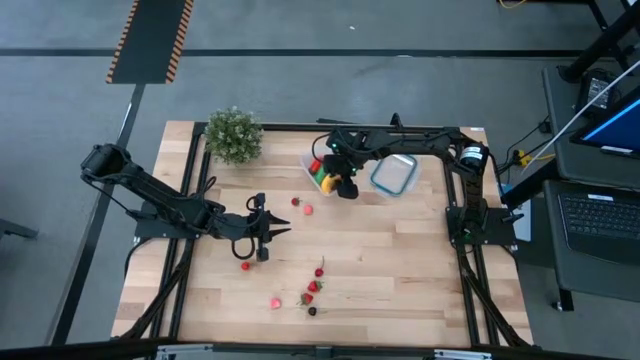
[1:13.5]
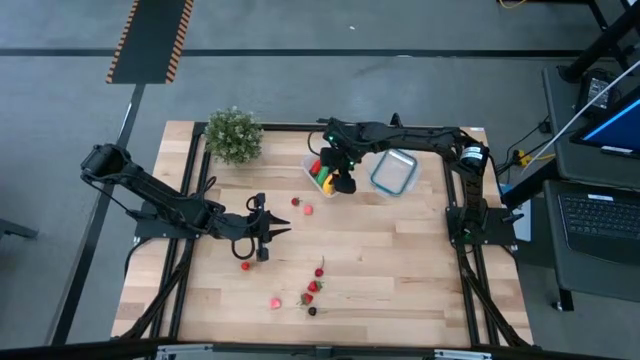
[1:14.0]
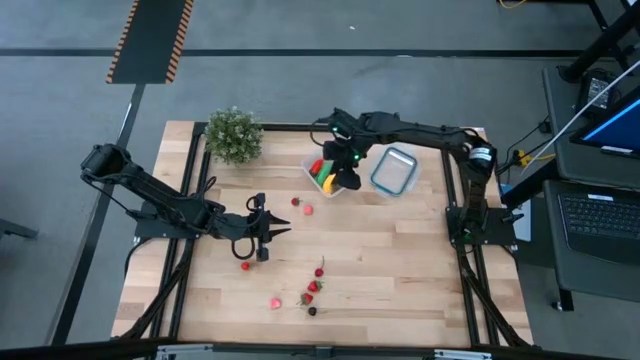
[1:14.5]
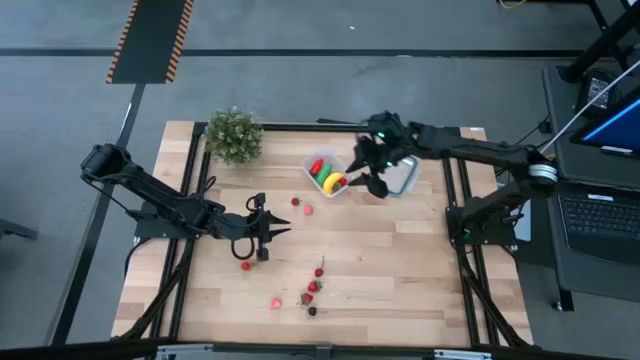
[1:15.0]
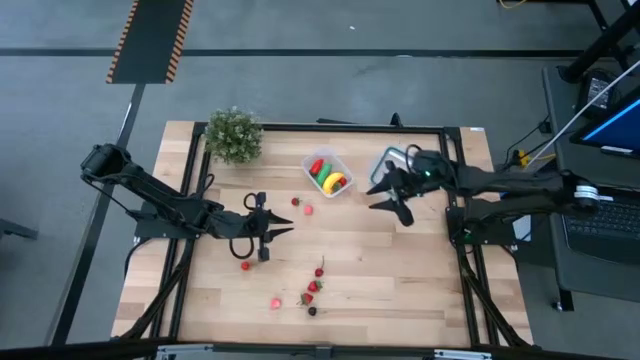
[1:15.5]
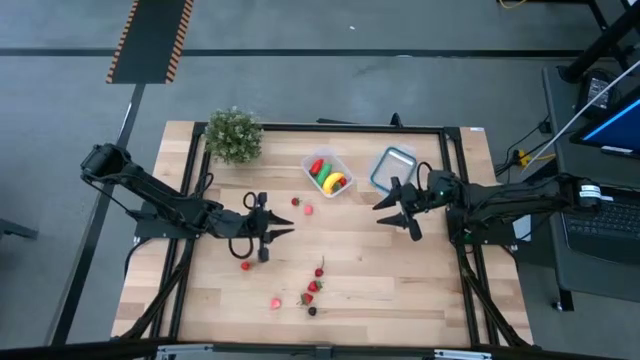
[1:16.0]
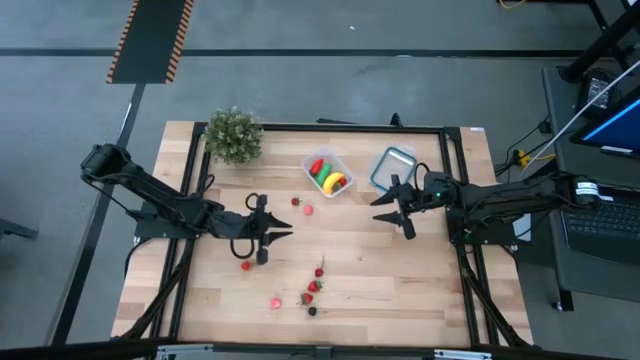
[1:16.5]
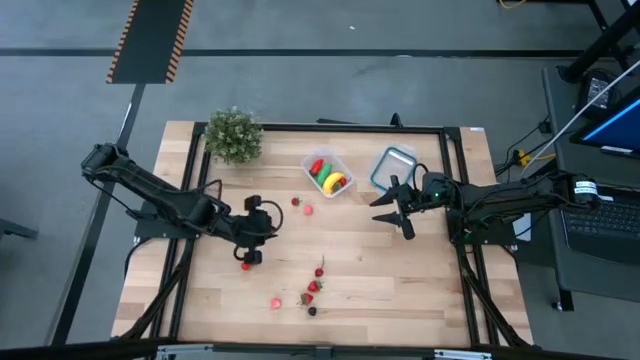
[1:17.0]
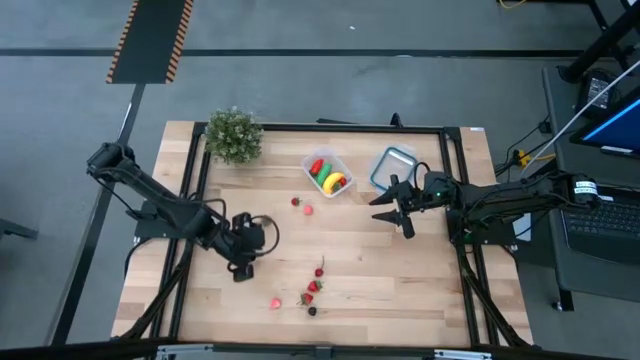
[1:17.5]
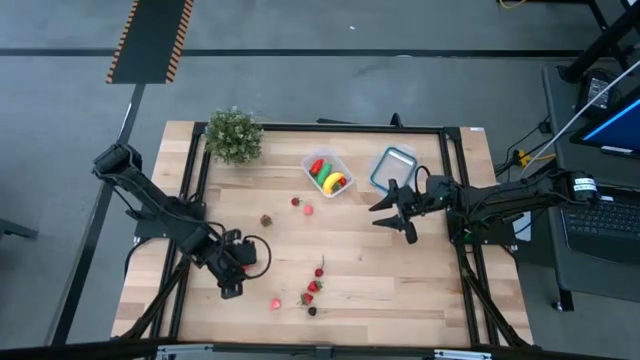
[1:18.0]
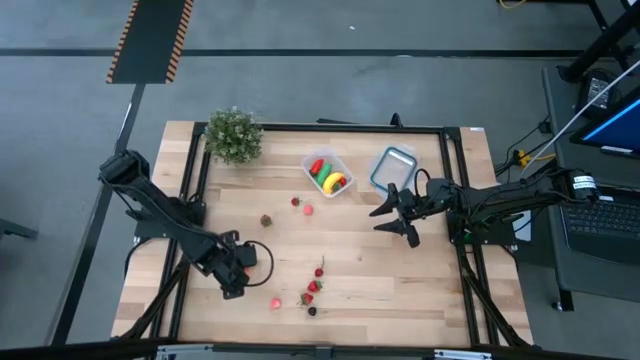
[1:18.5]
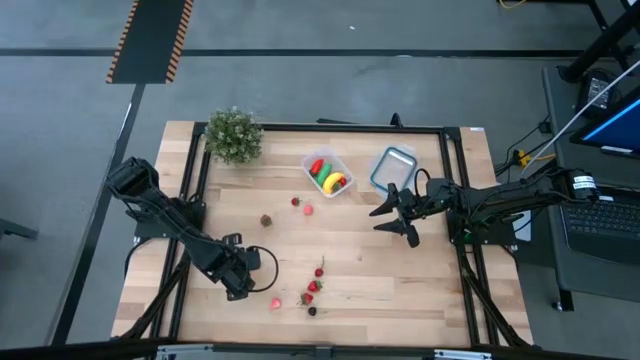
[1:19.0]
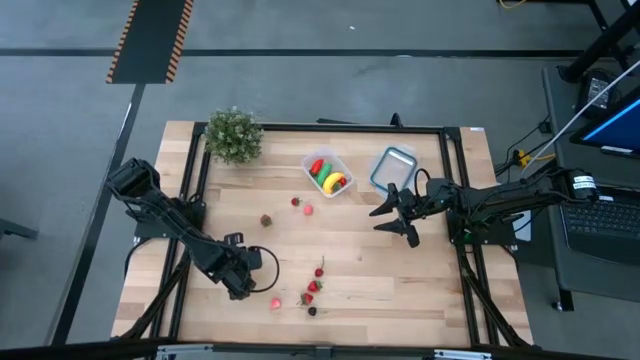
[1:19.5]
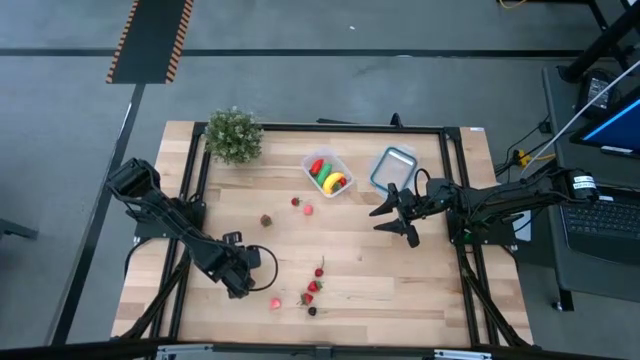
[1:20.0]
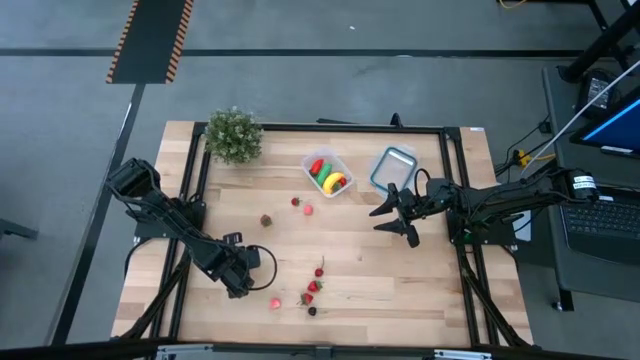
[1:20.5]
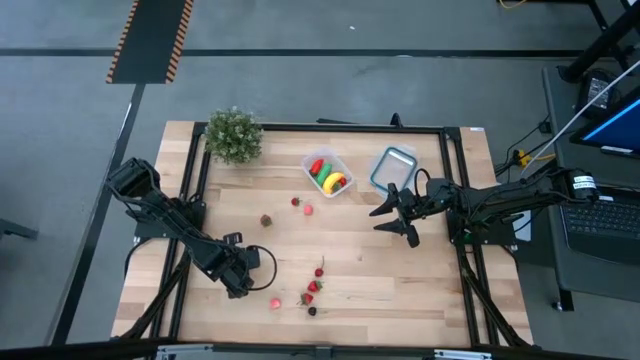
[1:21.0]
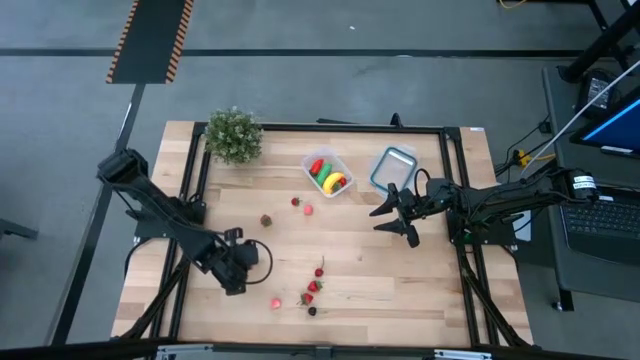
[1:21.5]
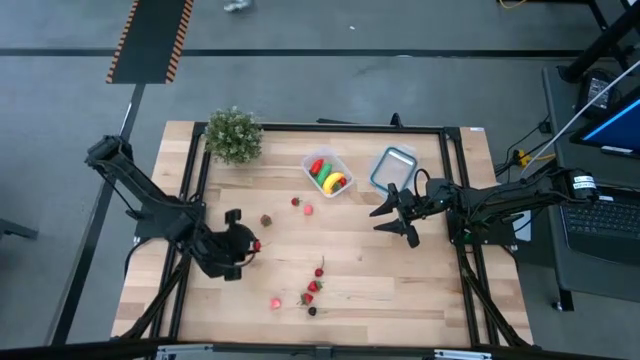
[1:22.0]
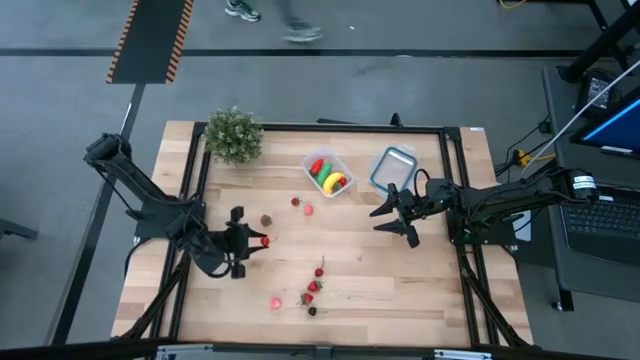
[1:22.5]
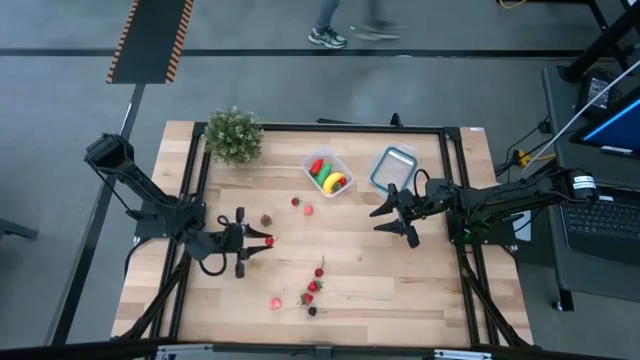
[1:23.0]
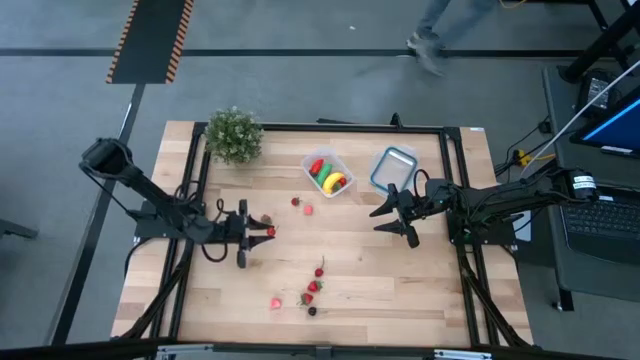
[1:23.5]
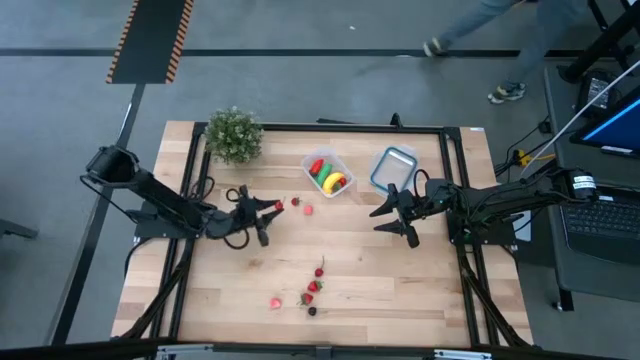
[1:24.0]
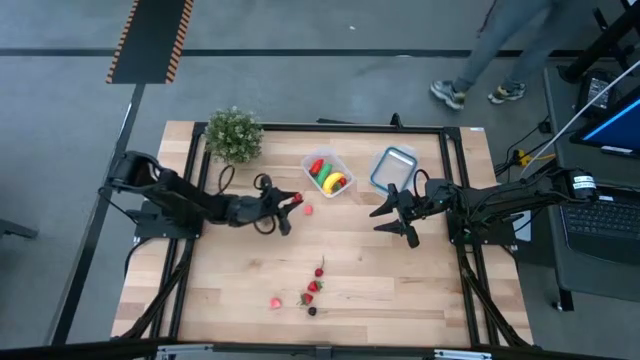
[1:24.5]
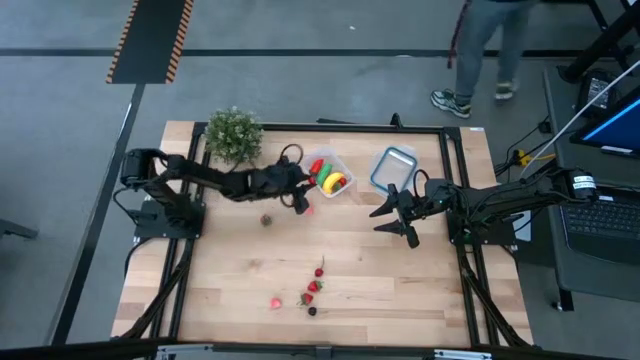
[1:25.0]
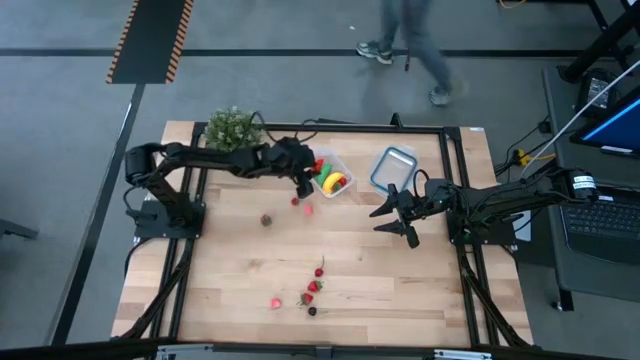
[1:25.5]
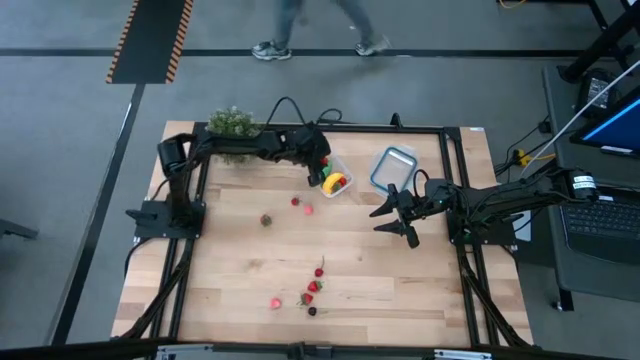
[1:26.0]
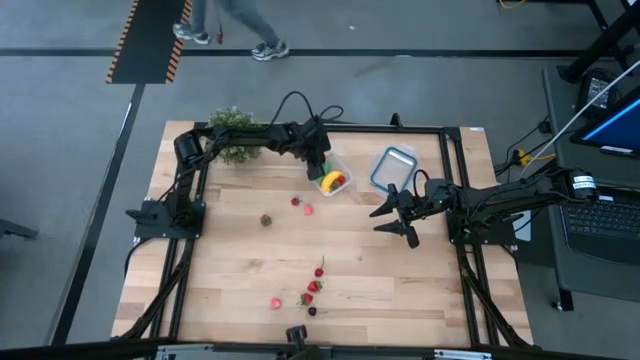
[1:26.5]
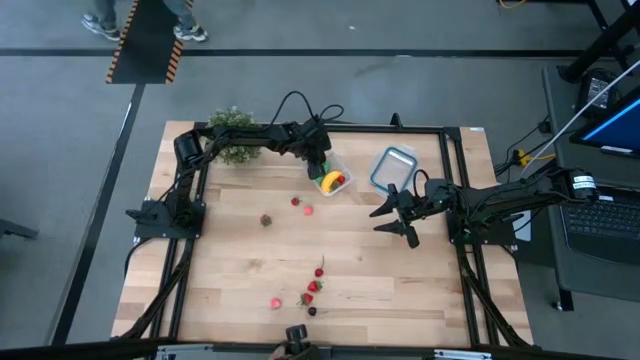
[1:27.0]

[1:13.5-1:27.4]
Task: Pick and placing Produce into tupperware
Put the left red cherry into the transparent container

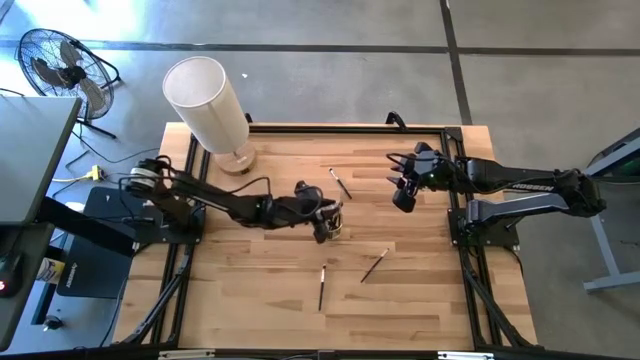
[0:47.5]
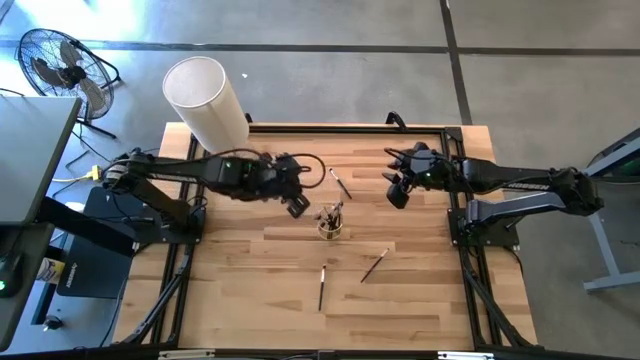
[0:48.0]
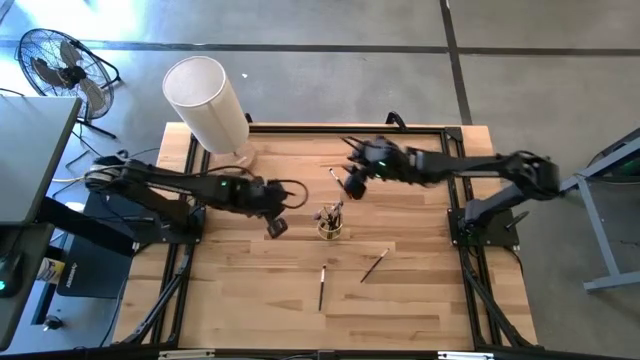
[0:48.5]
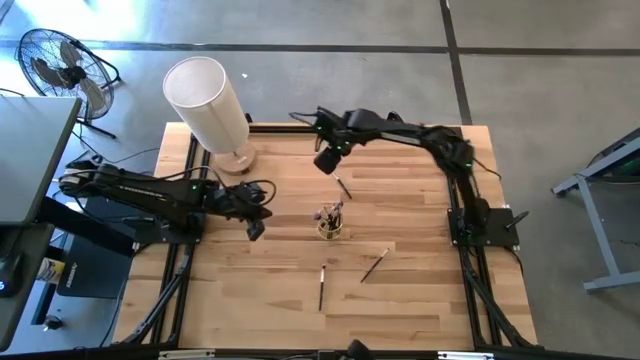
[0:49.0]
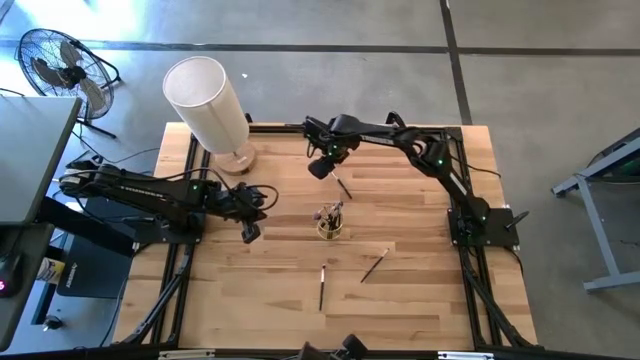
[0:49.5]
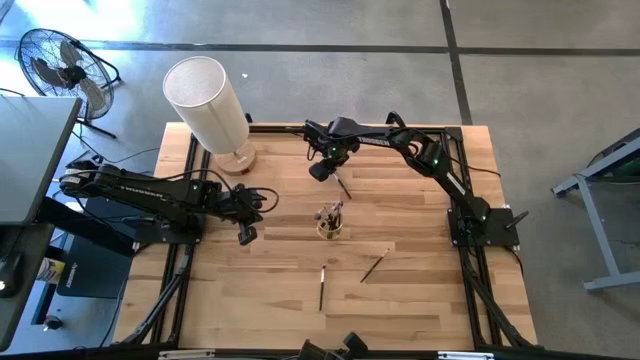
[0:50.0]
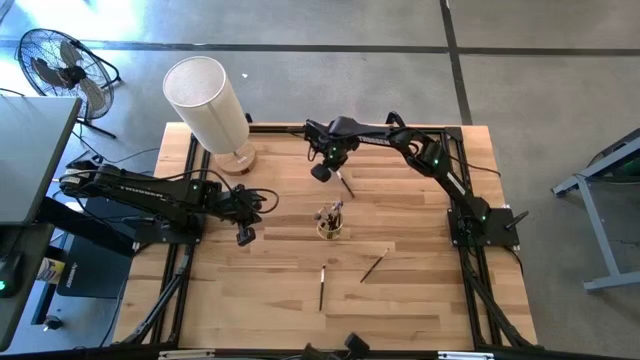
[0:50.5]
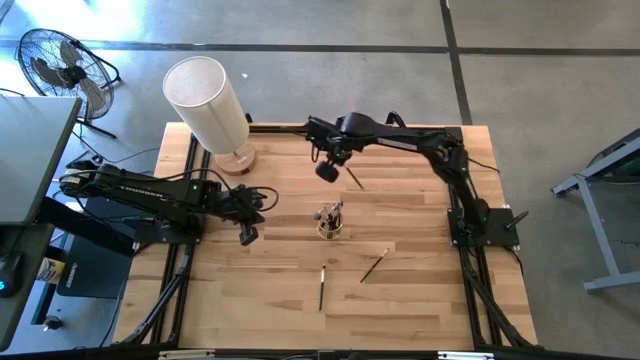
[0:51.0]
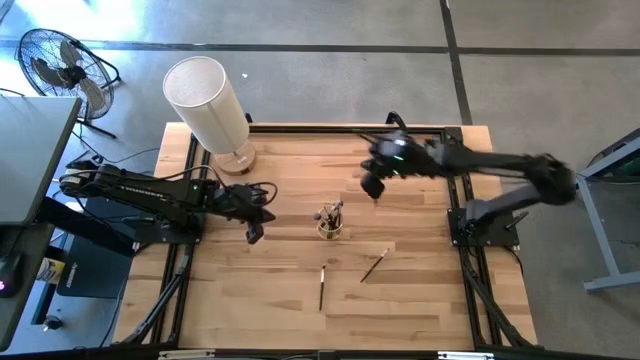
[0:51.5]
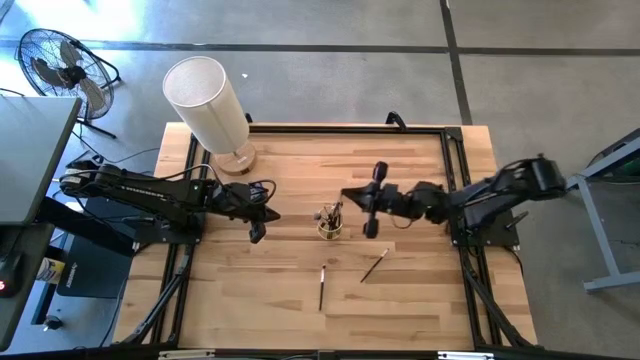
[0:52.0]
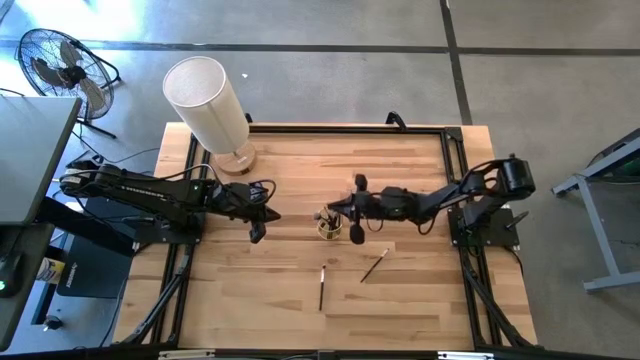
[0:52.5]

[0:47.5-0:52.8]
Task: Put items in baskets/containers
Put the eyeshadow brush into the wire organizer
